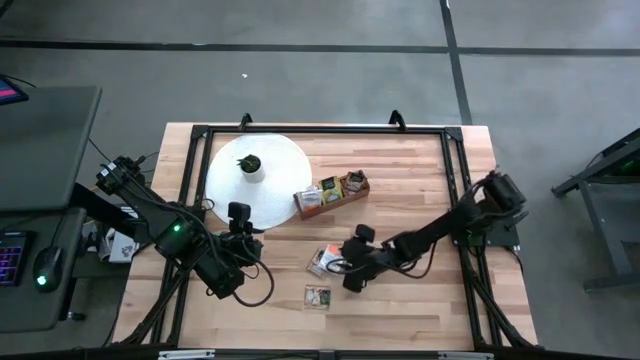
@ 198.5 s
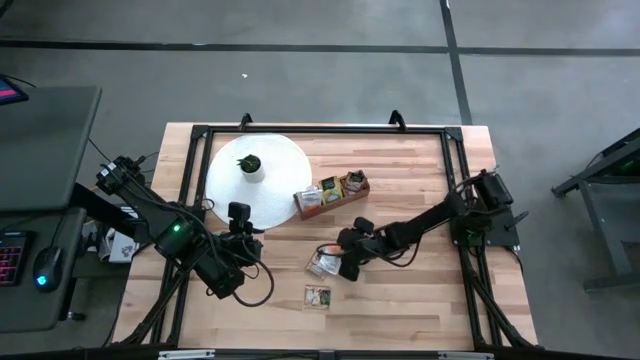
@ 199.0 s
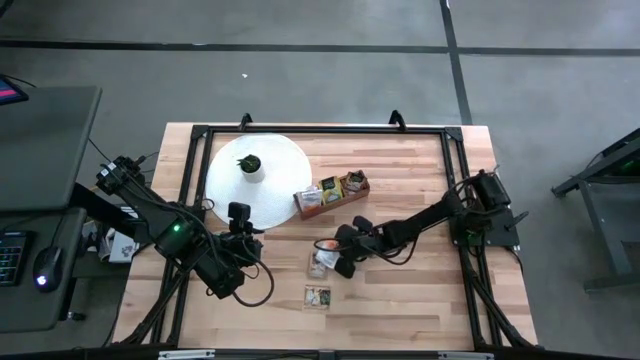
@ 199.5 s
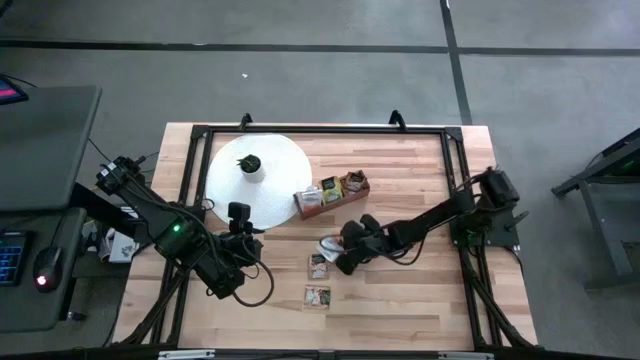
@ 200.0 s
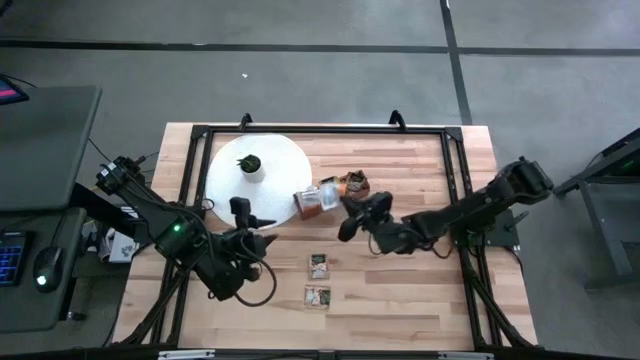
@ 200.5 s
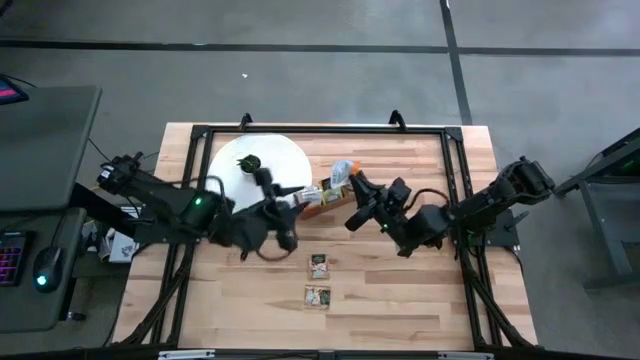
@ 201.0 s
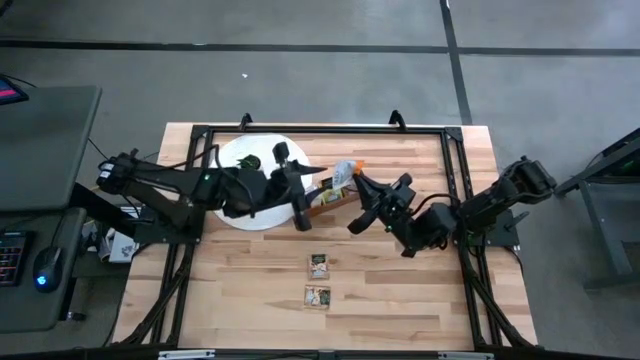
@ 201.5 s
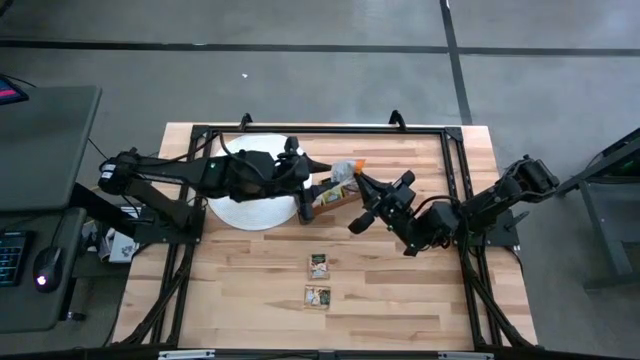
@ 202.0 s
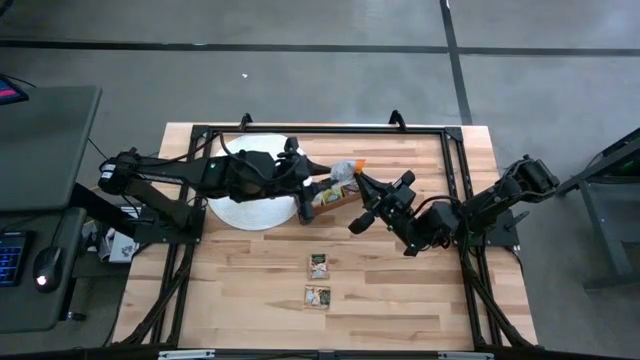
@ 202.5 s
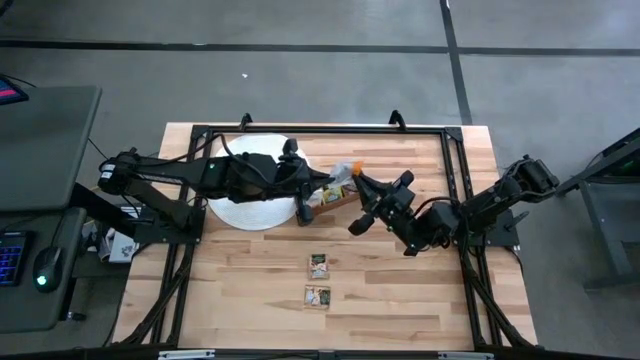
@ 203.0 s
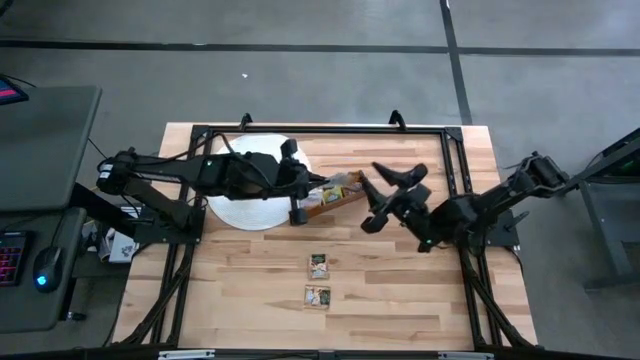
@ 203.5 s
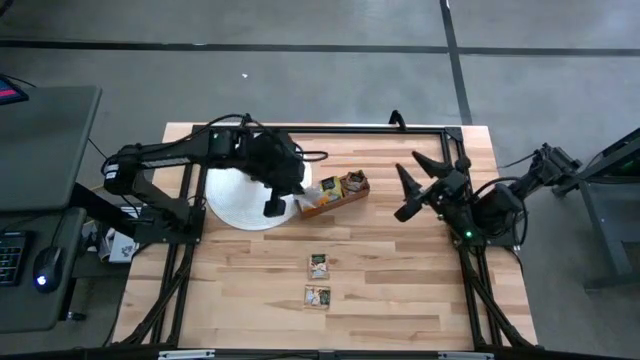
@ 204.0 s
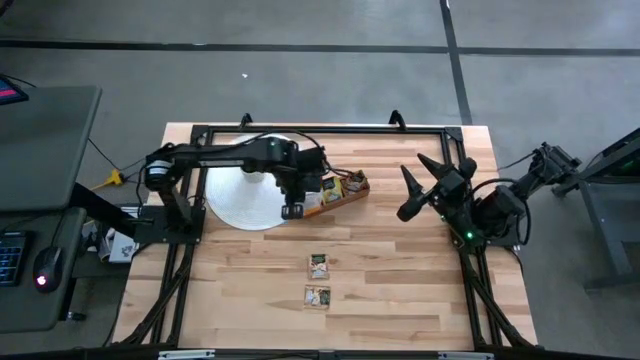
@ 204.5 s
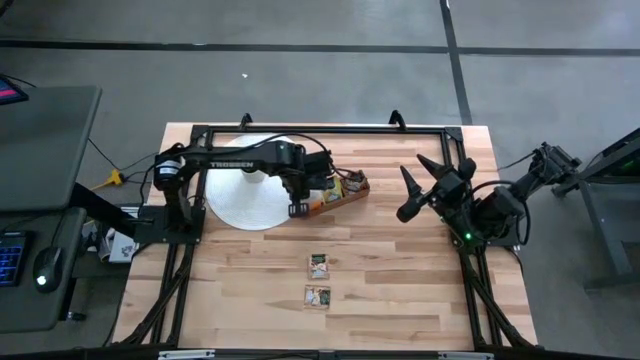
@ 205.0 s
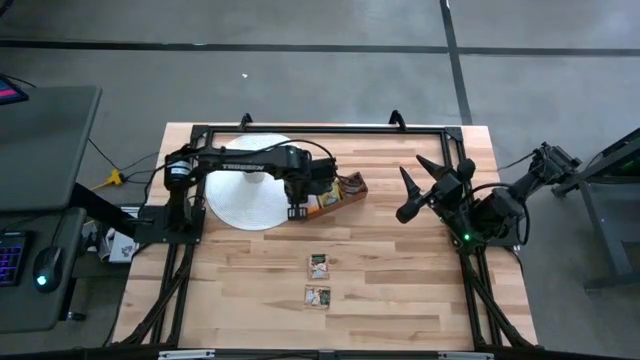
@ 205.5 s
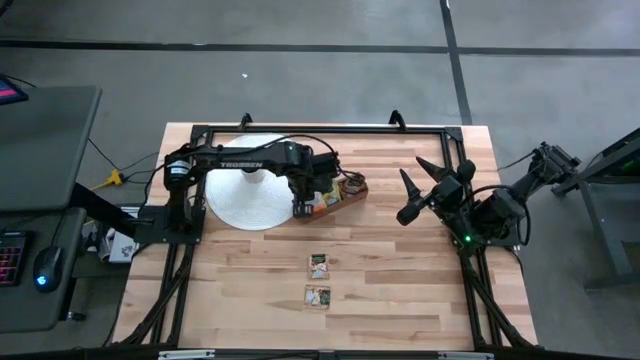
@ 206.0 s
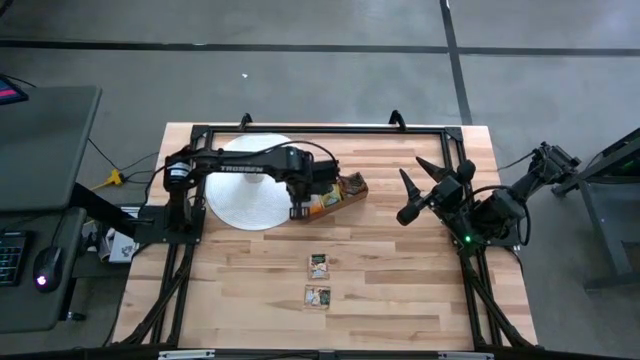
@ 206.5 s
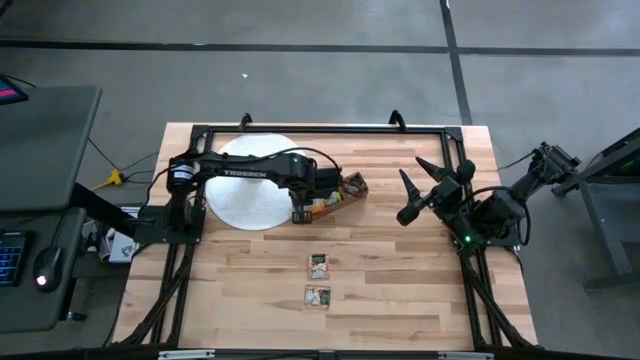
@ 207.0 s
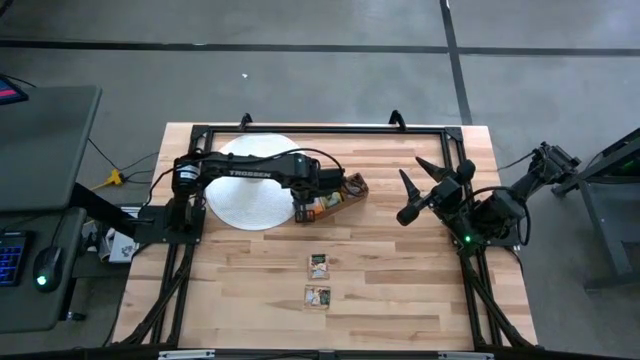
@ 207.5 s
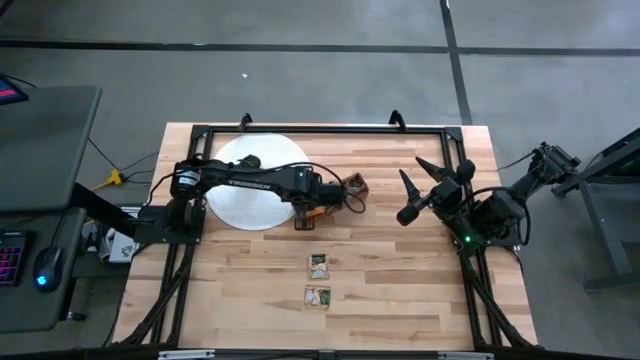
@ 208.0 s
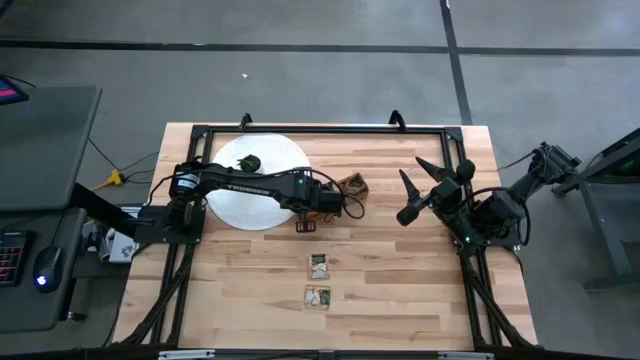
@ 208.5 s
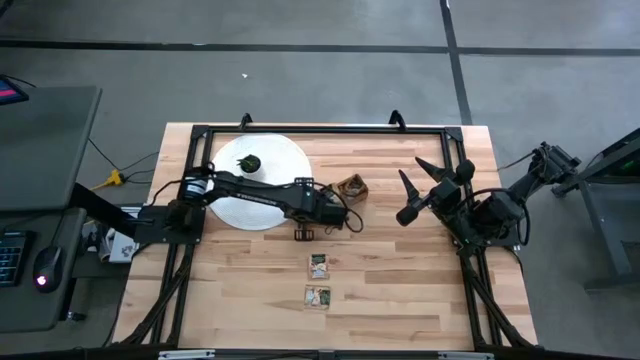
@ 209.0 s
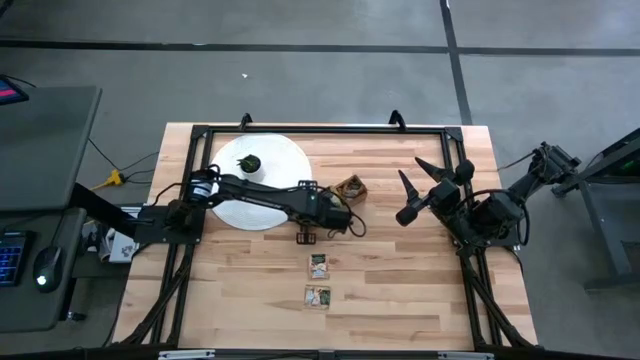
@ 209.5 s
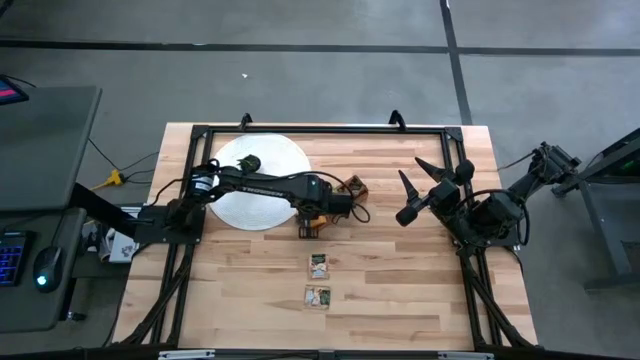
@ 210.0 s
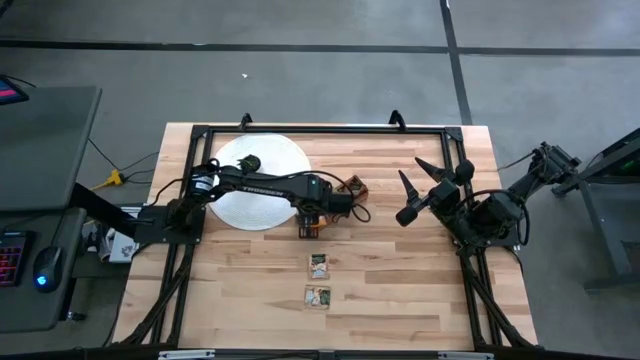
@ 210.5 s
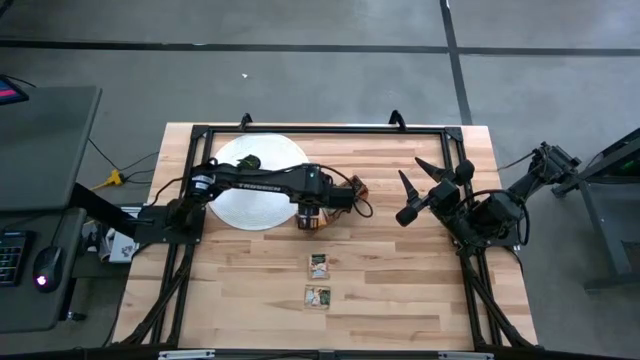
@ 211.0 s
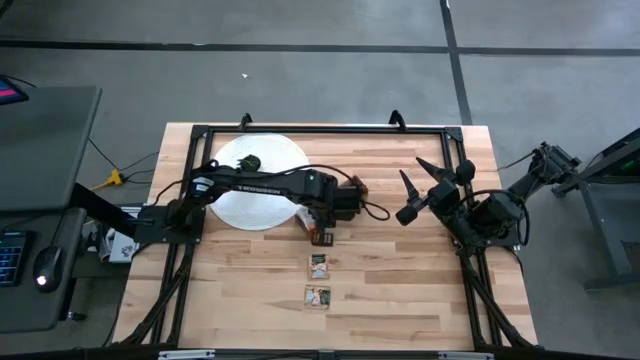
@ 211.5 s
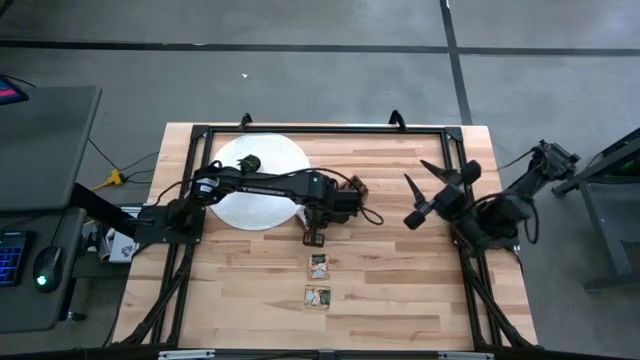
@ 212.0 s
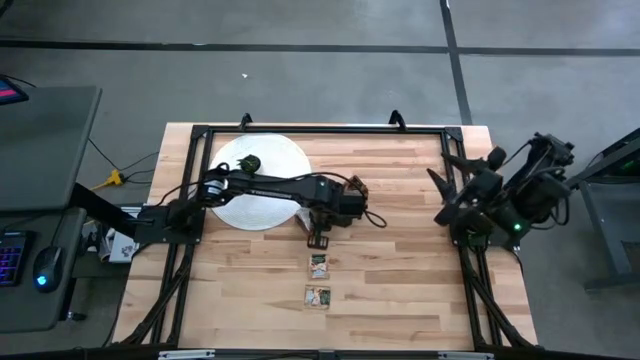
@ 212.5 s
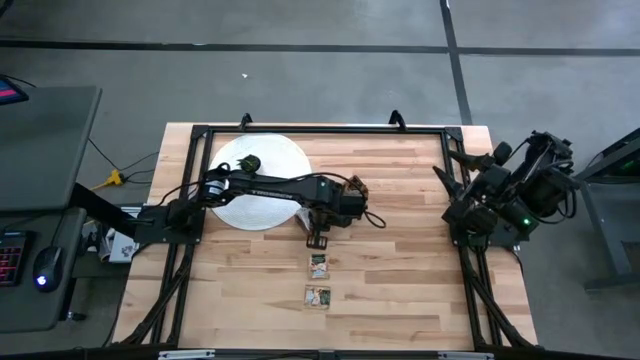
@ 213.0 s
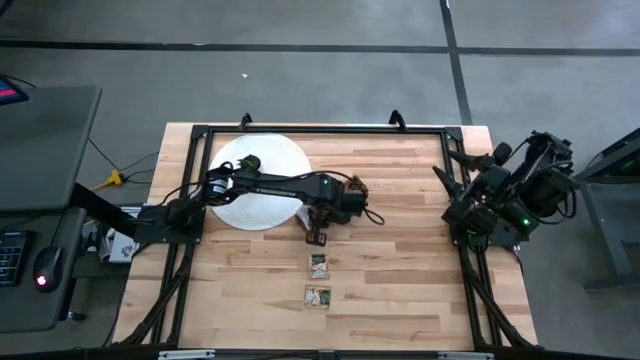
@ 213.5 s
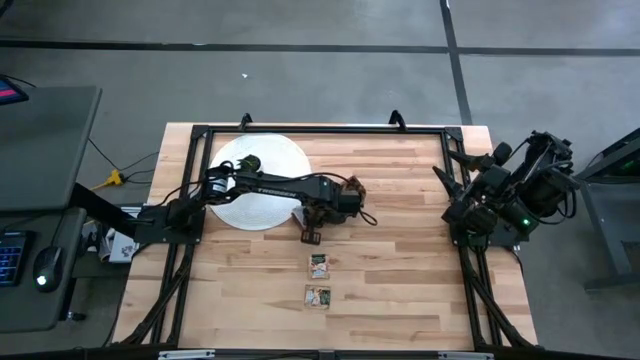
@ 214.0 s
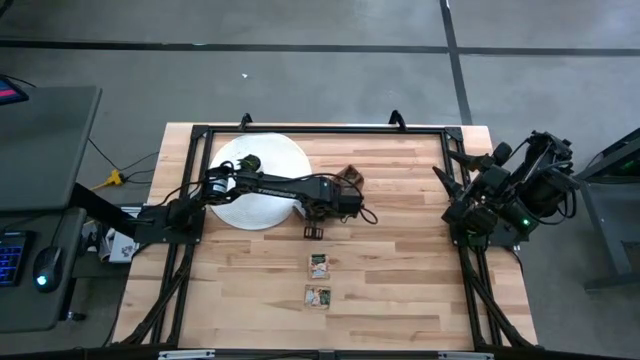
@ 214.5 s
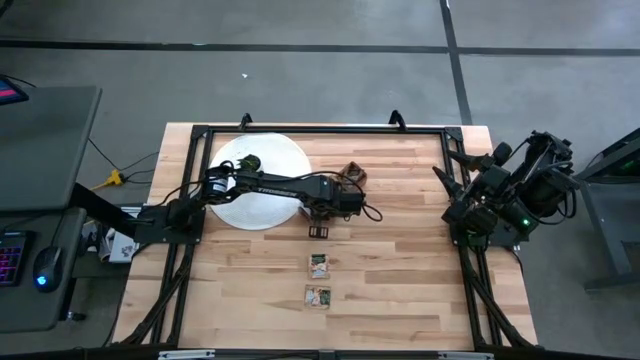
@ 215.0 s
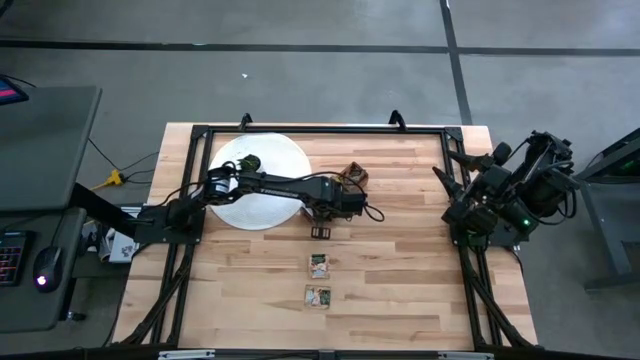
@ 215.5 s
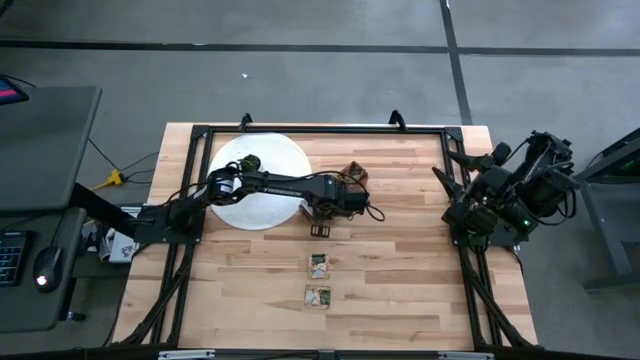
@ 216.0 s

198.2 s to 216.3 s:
Task: Pick & Place Tea
Put the white tea bag into the left section of the wooden organizer

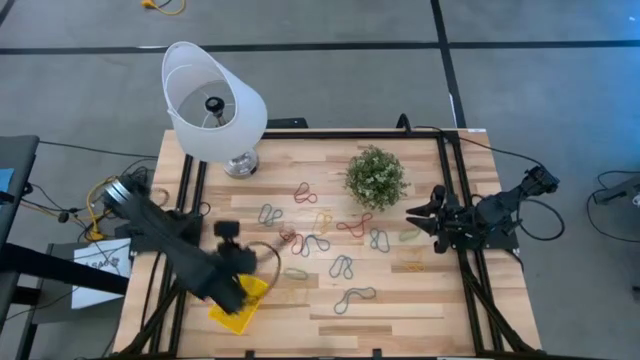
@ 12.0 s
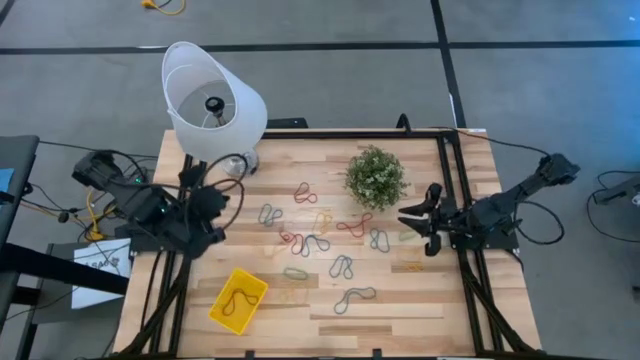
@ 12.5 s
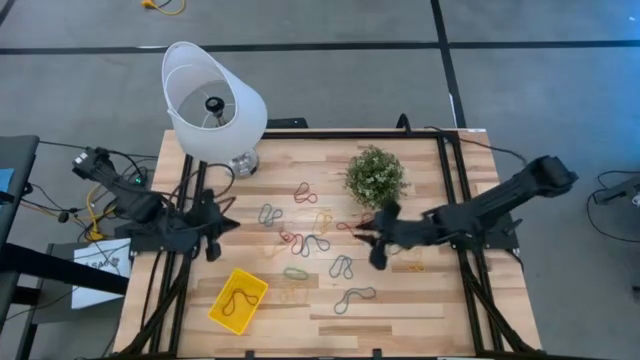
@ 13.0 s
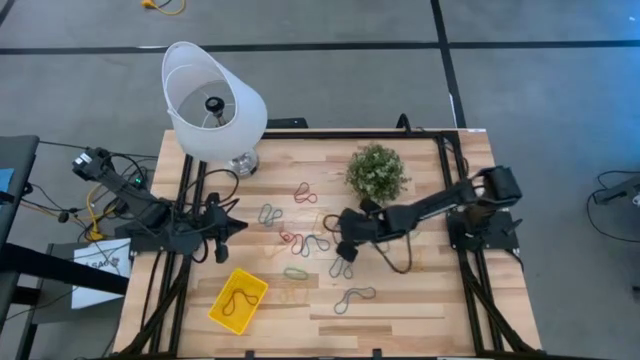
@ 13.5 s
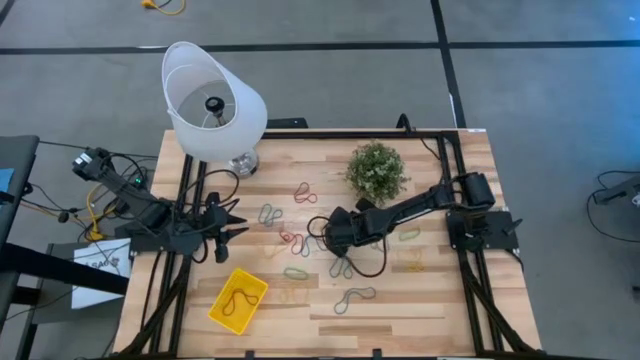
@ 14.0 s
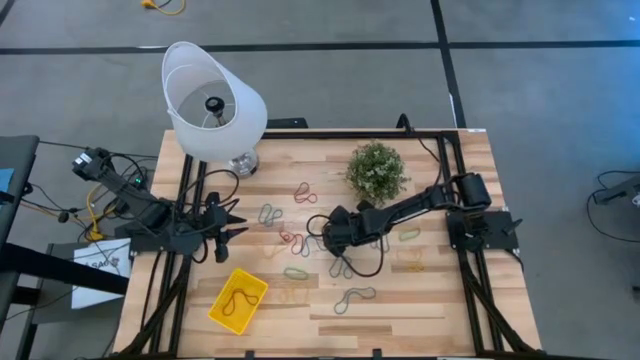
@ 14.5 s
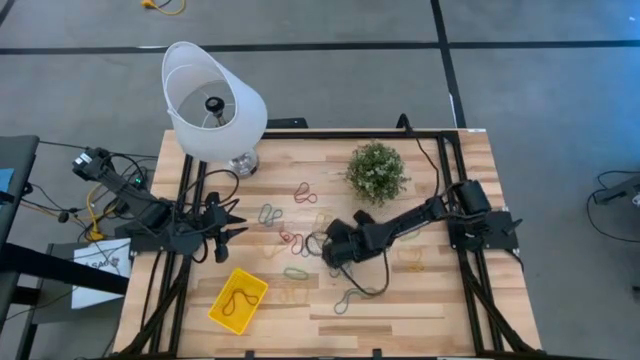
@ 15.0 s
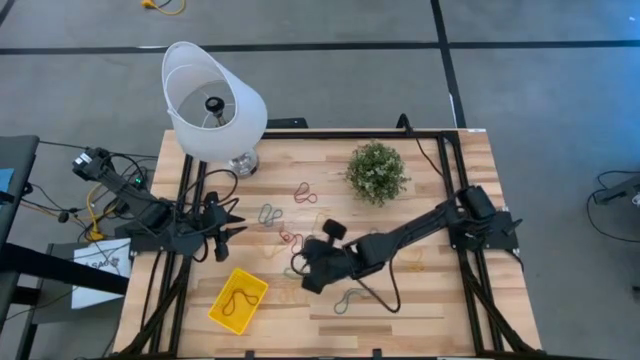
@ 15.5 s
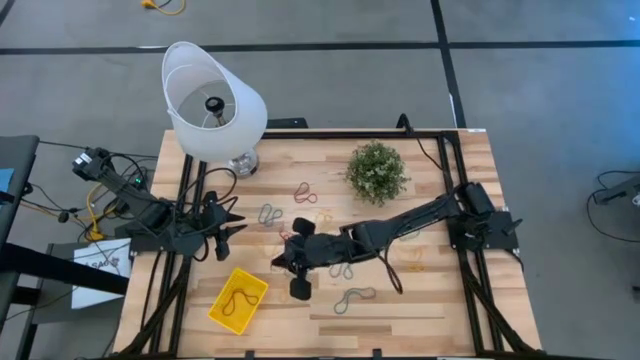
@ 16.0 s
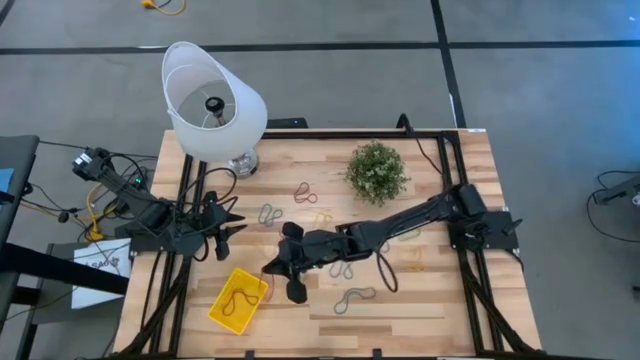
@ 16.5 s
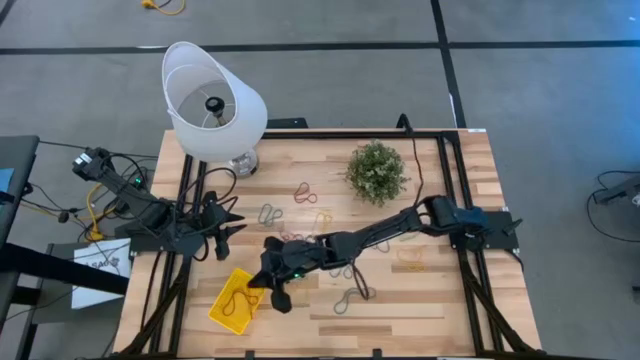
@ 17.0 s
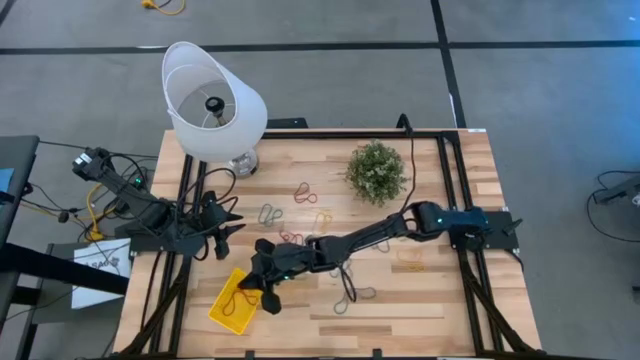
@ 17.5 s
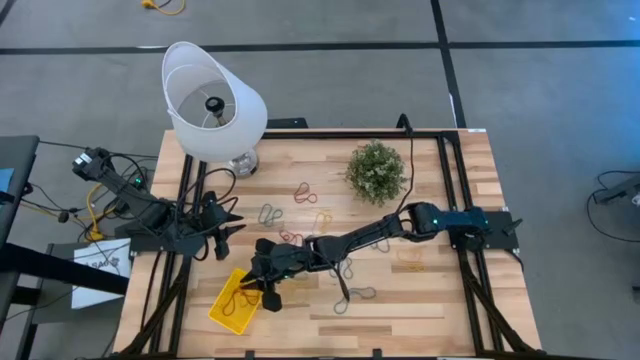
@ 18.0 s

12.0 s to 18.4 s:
Task: Pick and place items into bin
Put the right red rubberband into the yellow bin
